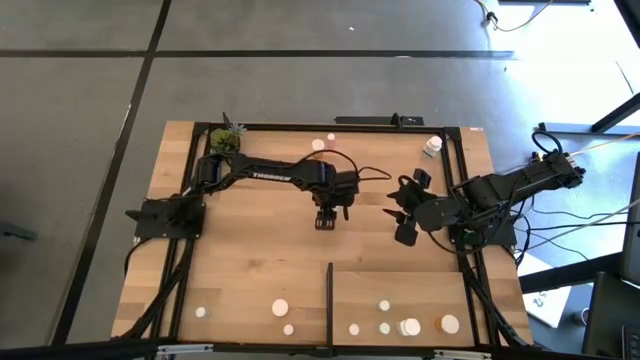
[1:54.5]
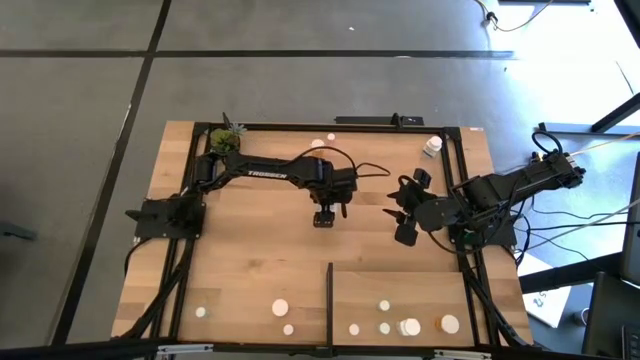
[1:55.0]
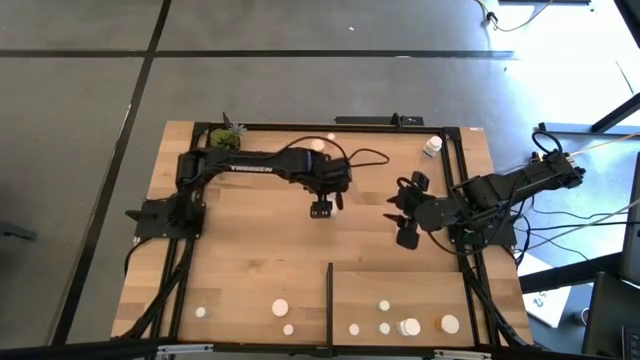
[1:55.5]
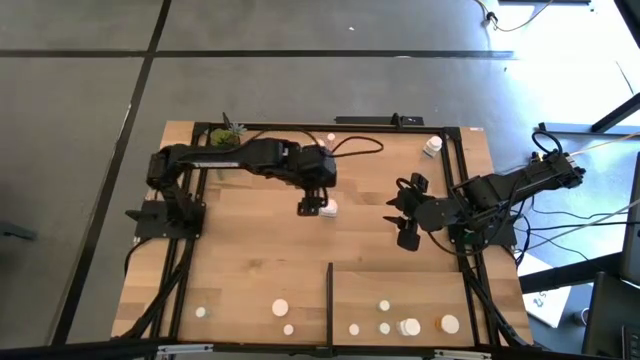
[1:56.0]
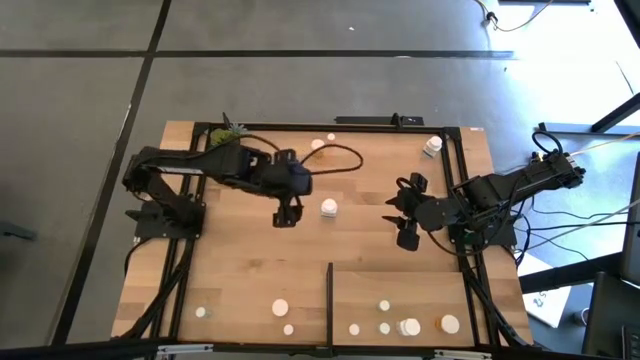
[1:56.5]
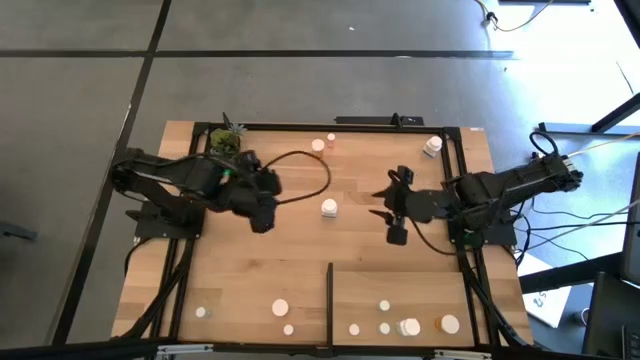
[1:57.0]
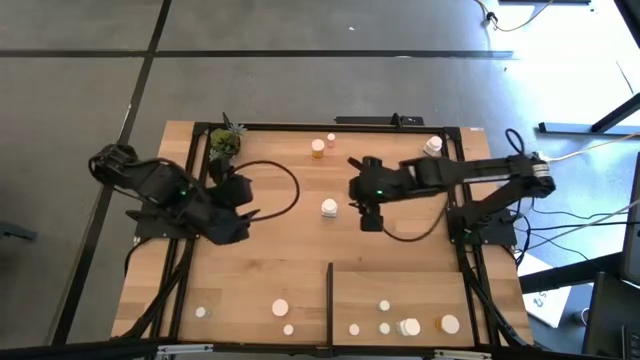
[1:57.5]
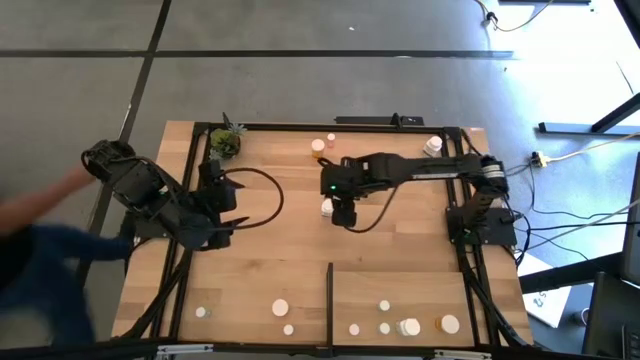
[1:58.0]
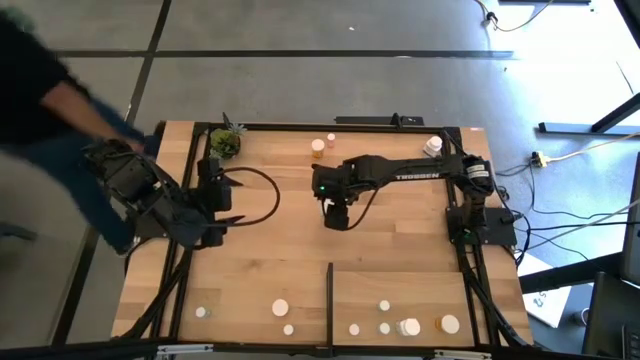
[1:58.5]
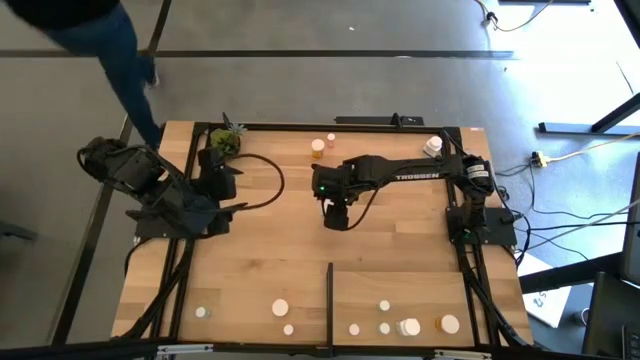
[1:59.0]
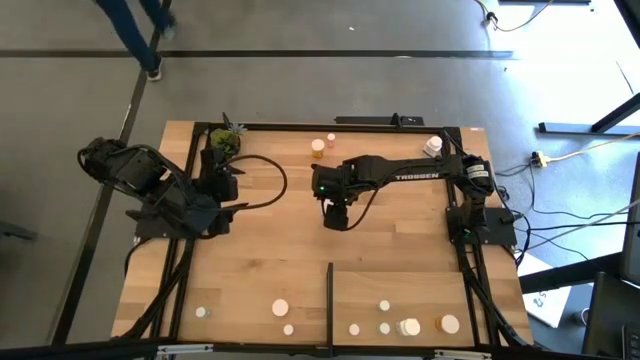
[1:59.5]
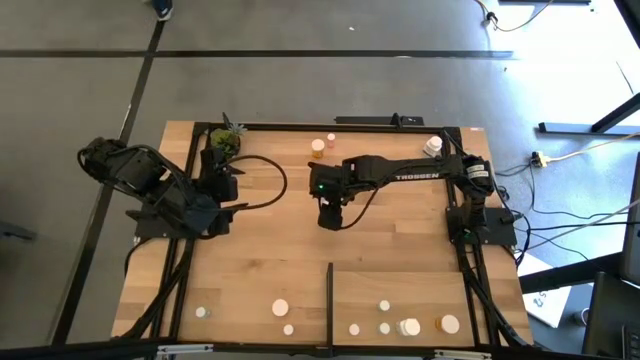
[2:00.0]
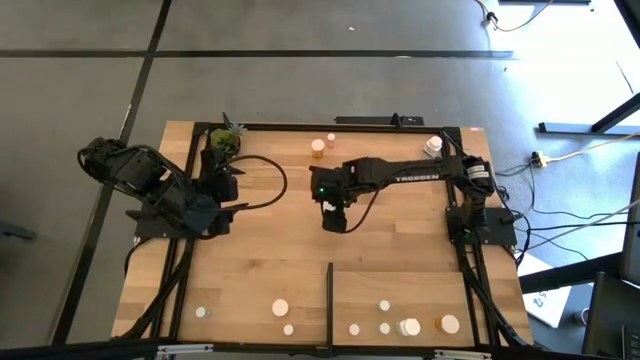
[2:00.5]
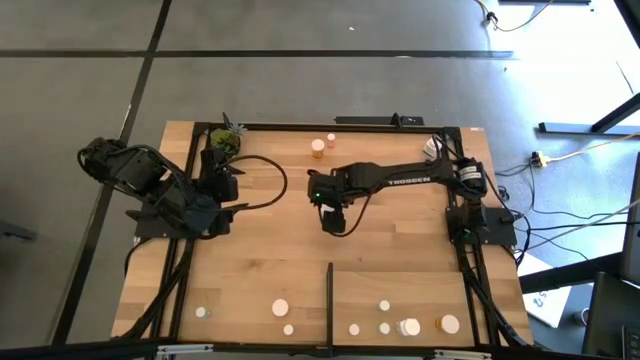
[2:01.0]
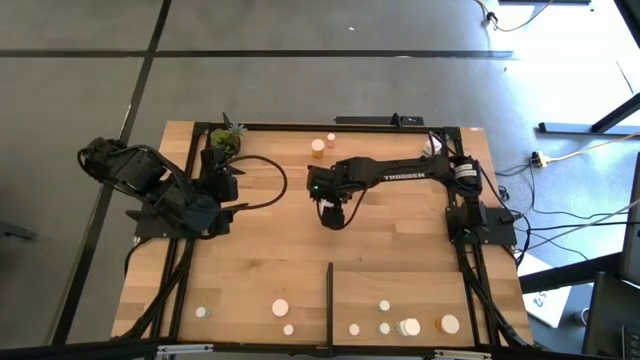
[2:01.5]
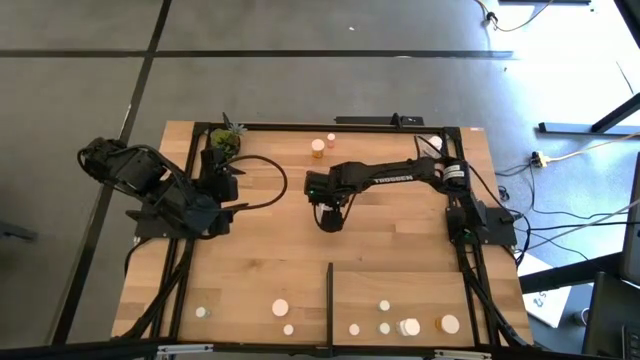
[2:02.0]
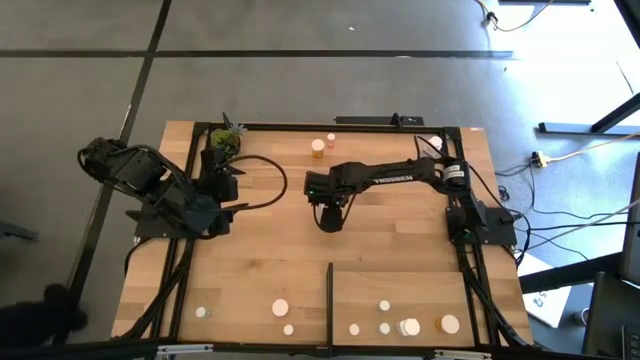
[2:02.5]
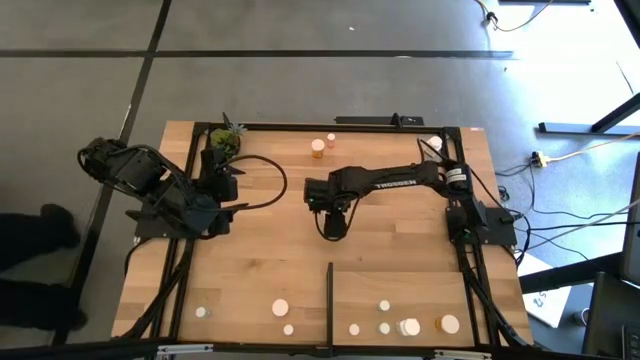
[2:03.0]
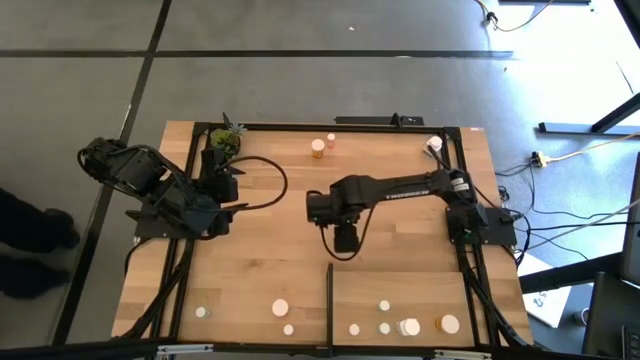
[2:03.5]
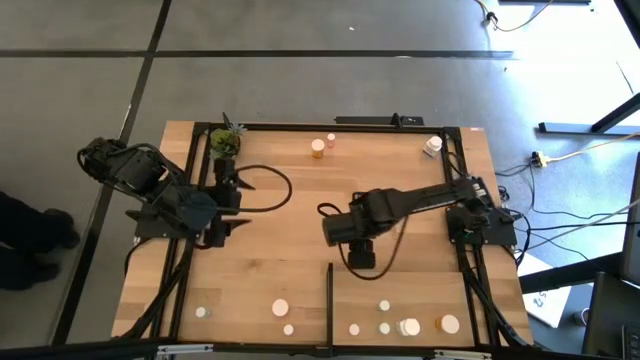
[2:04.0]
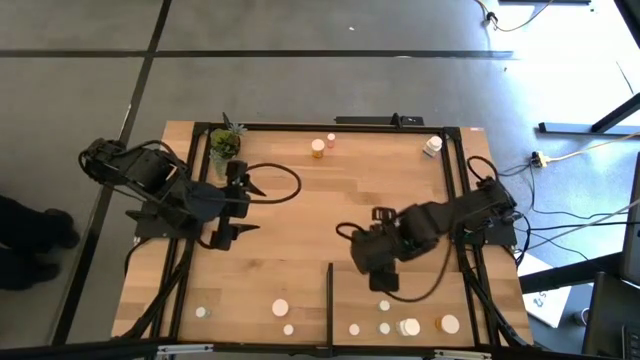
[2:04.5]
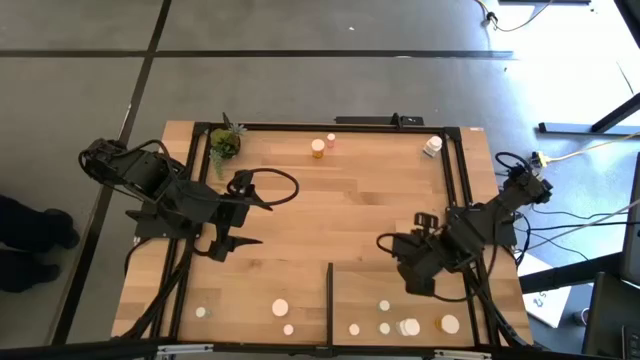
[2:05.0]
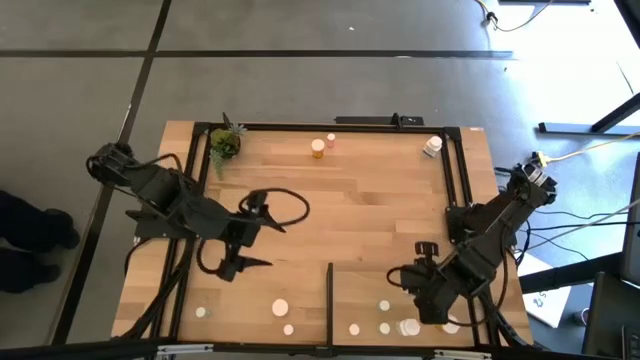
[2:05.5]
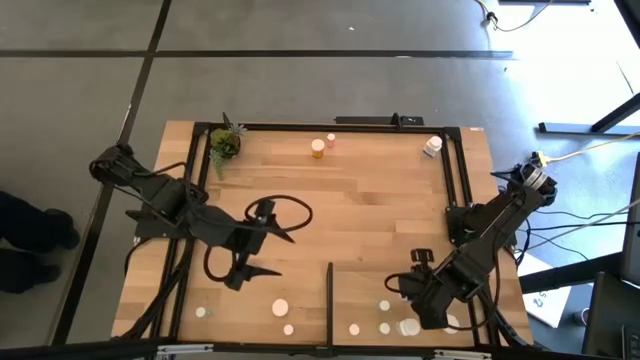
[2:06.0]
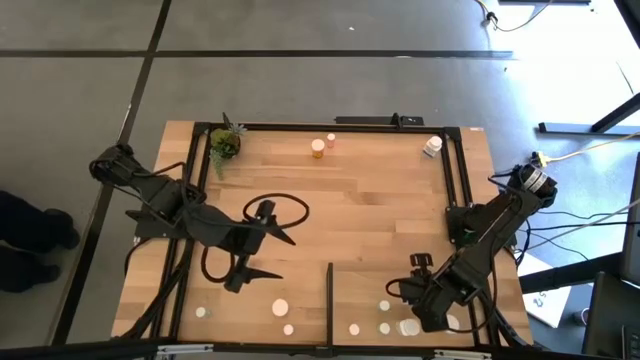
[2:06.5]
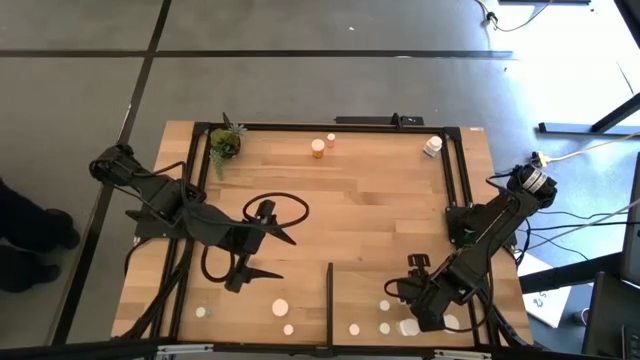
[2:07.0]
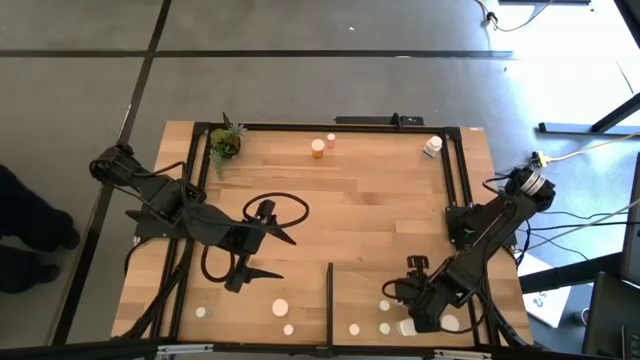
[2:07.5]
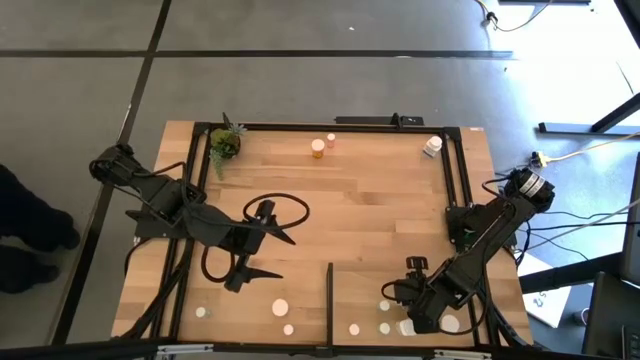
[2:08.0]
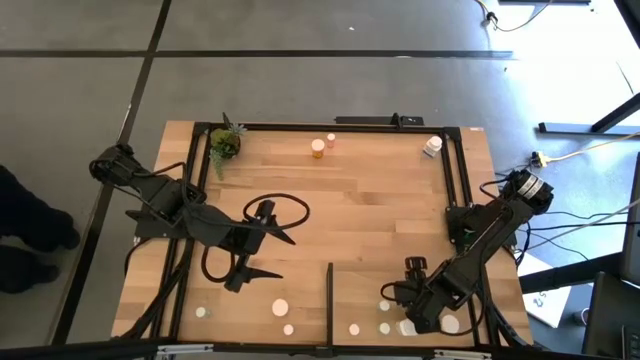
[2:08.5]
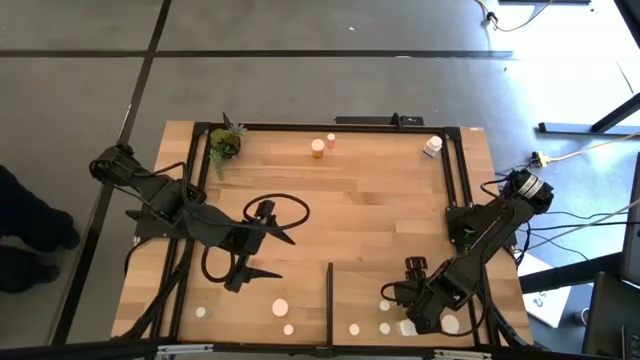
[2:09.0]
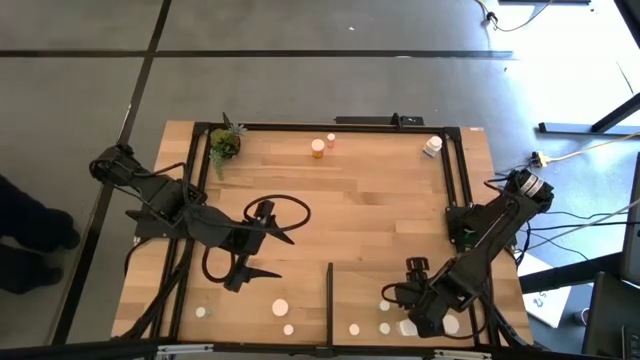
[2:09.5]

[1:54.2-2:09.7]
Task: Pick and place medicine bottles onto shelf by color
Put the bottom white pill bottle on the shelf aligned with the other white pill bottle

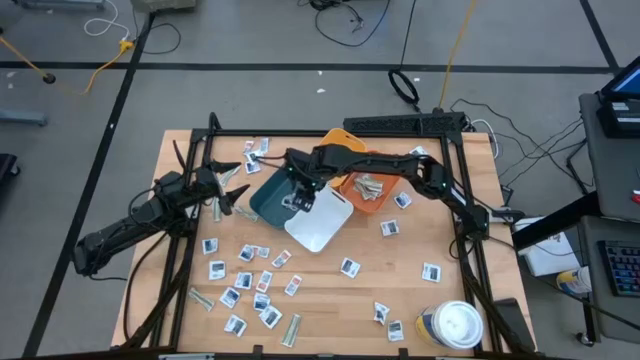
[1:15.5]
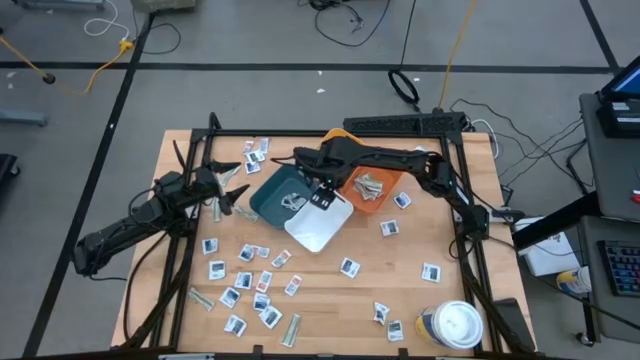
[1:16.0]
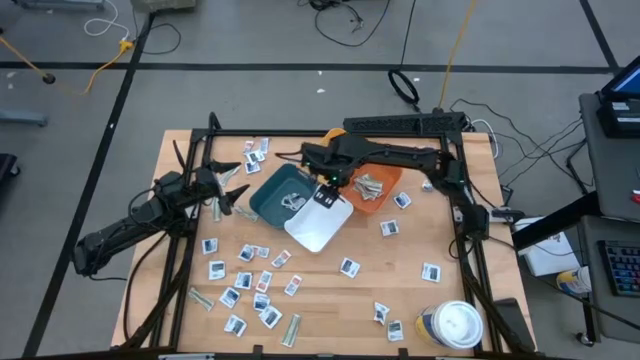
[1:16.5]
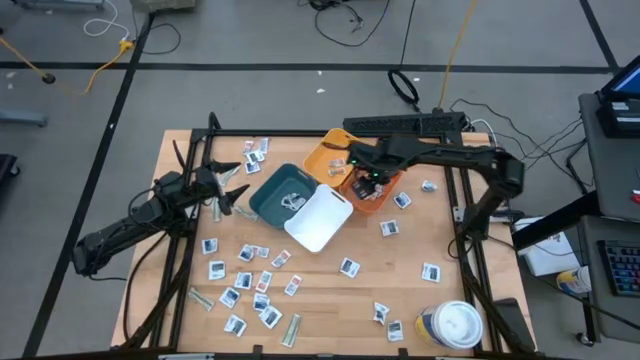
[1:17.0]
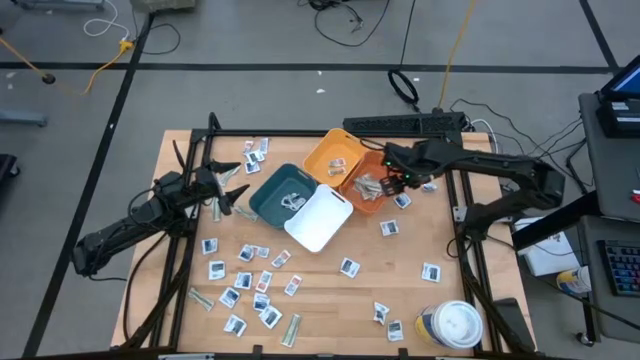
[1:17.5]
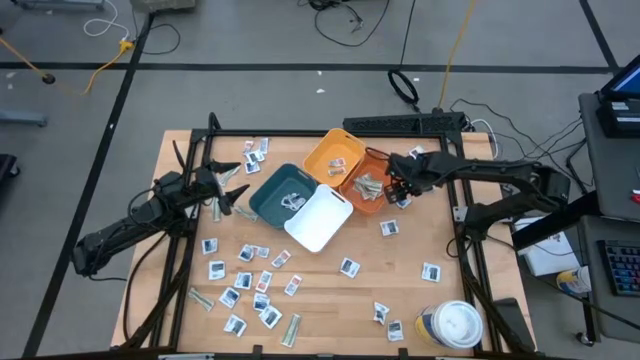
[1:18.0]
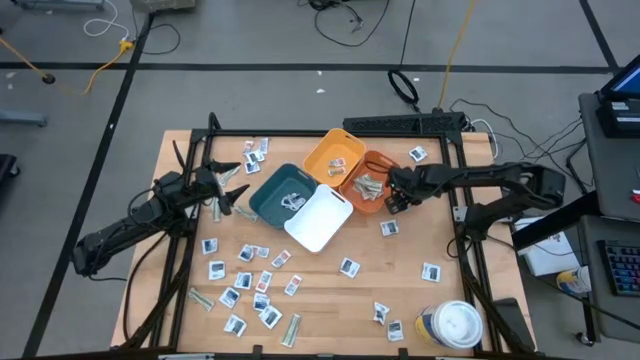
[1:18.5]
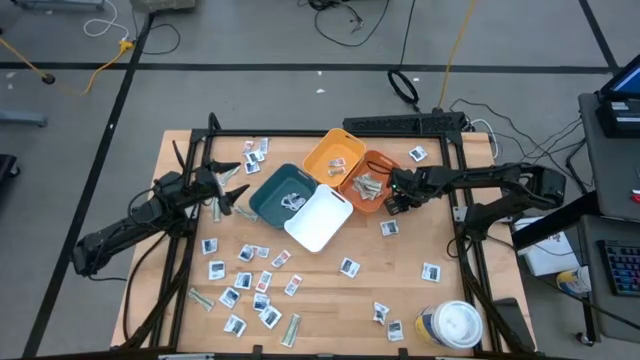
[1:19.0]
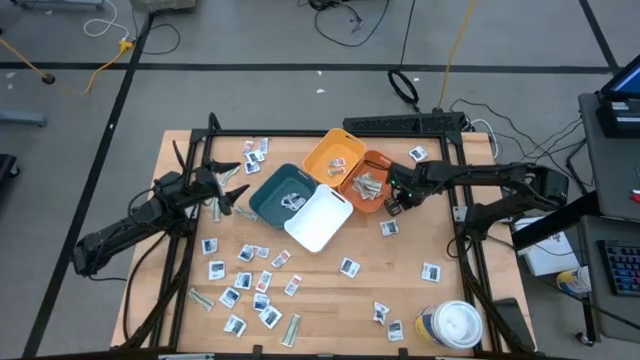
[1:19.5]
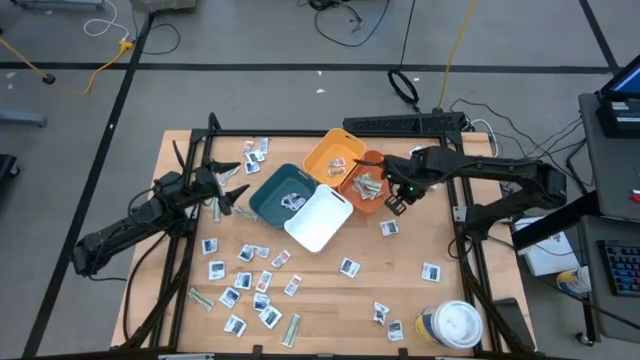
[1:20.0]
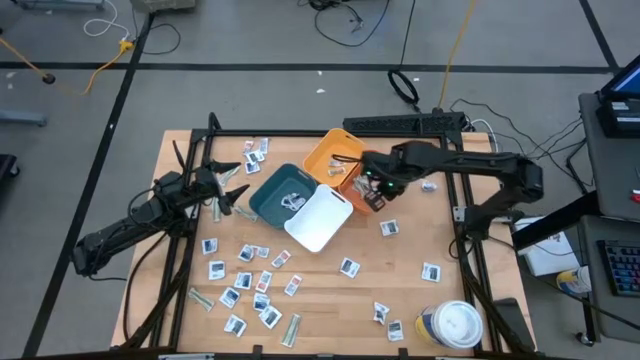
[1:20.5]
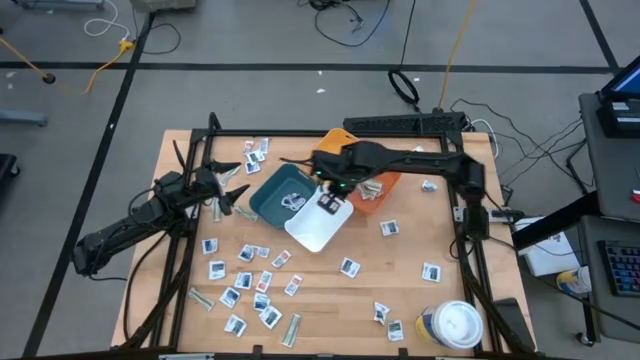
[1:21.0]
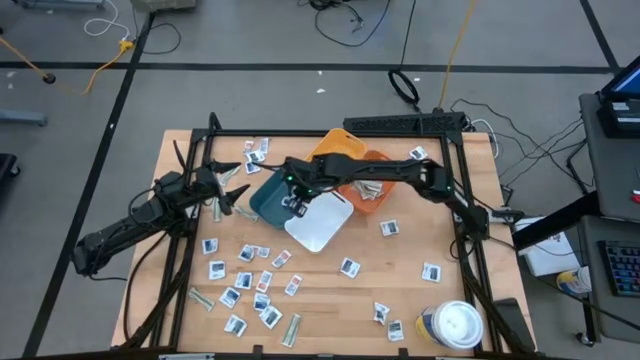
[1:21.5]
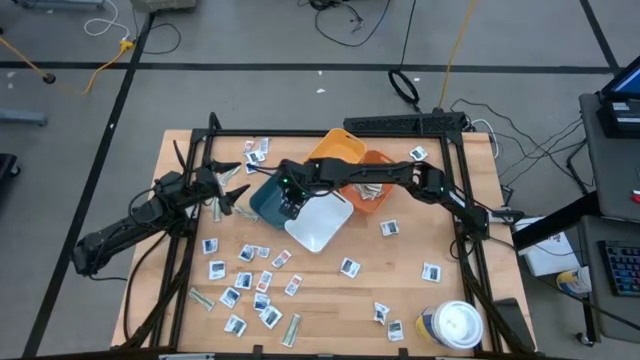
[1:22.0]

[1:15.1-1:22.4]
Task: Pick & Place First Aid Supplies
Put the blue alcohol pad into the blue bin
